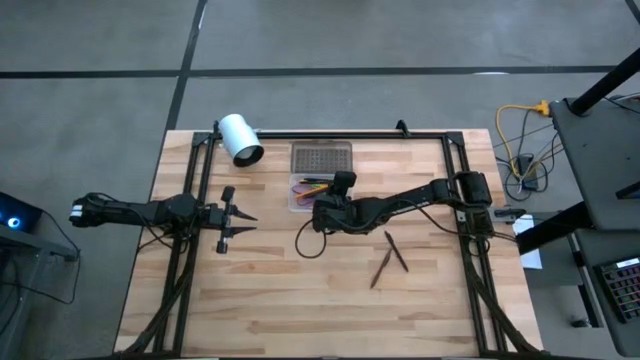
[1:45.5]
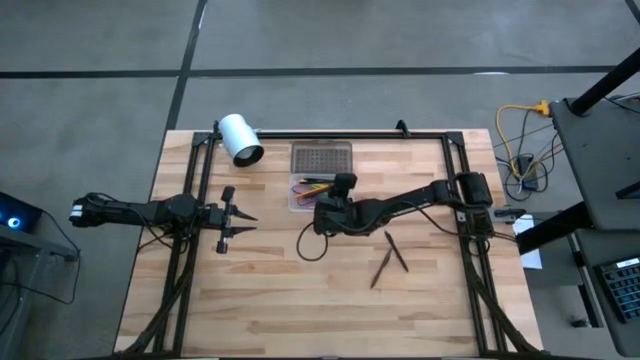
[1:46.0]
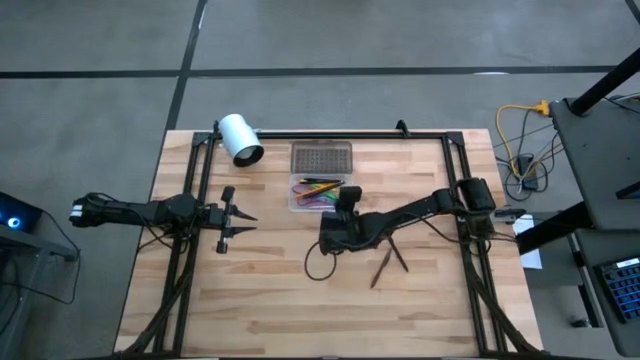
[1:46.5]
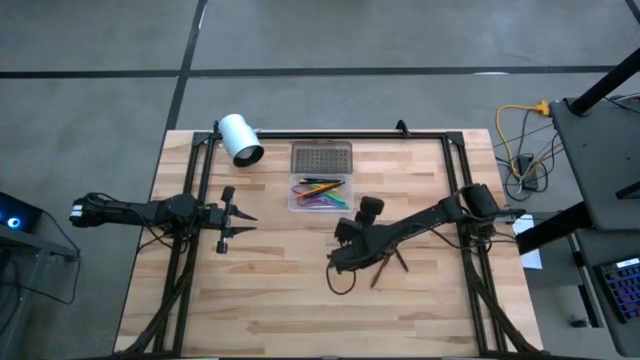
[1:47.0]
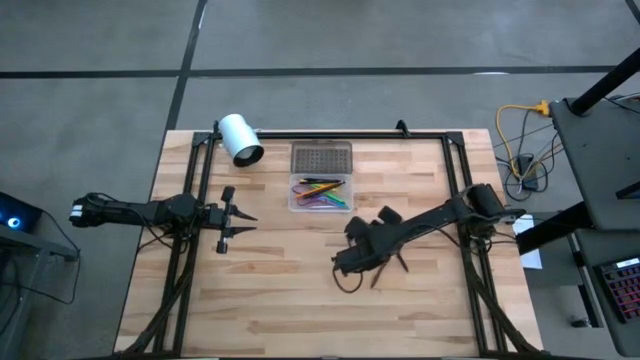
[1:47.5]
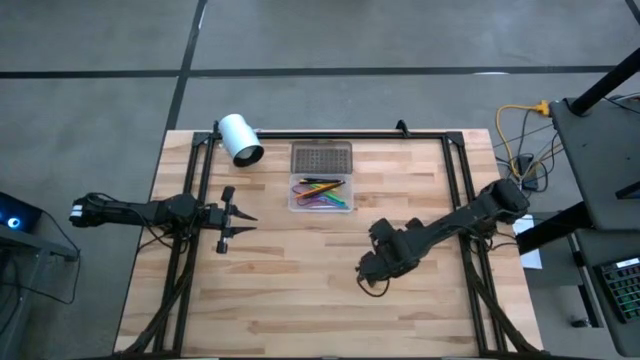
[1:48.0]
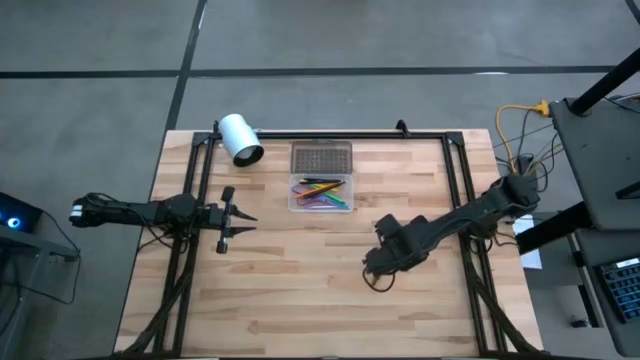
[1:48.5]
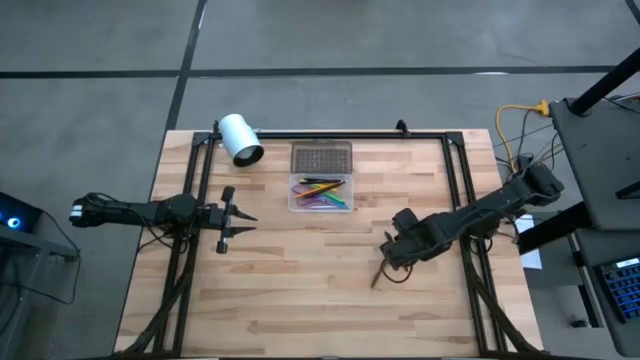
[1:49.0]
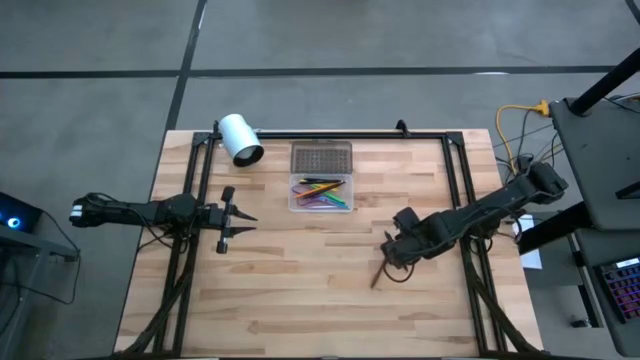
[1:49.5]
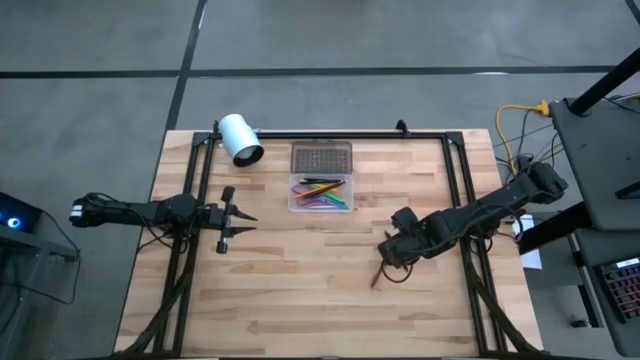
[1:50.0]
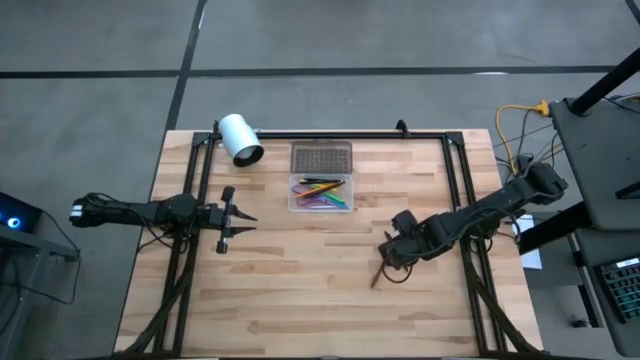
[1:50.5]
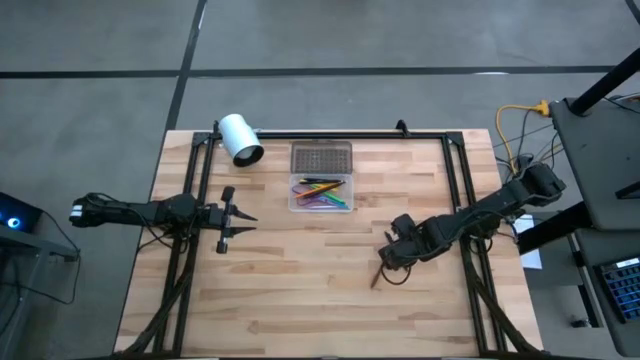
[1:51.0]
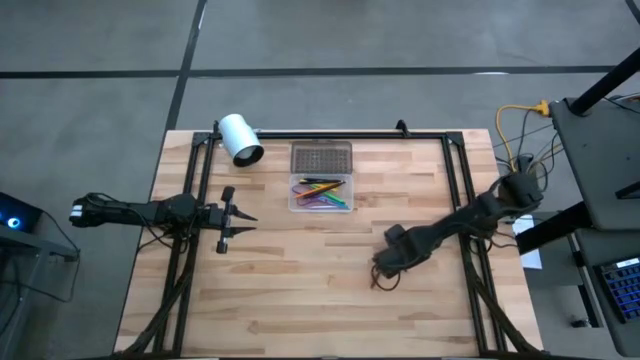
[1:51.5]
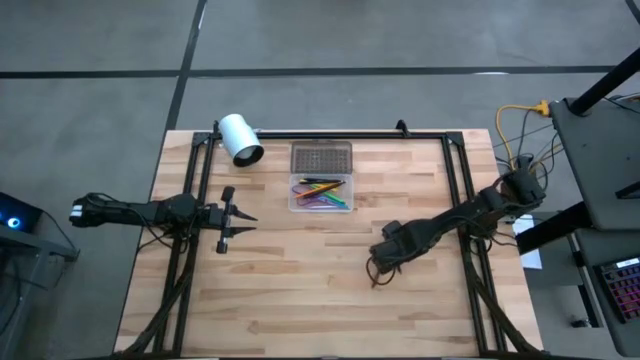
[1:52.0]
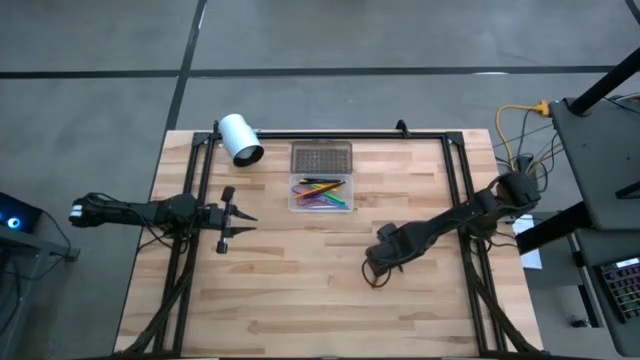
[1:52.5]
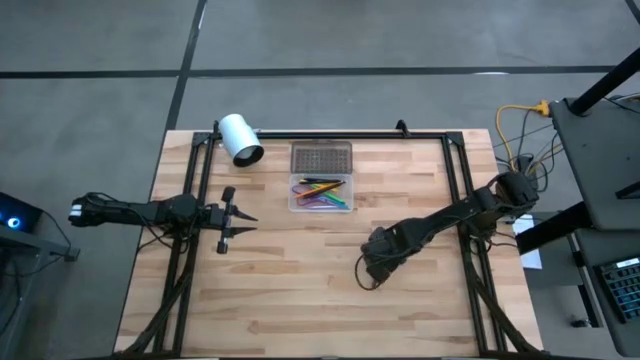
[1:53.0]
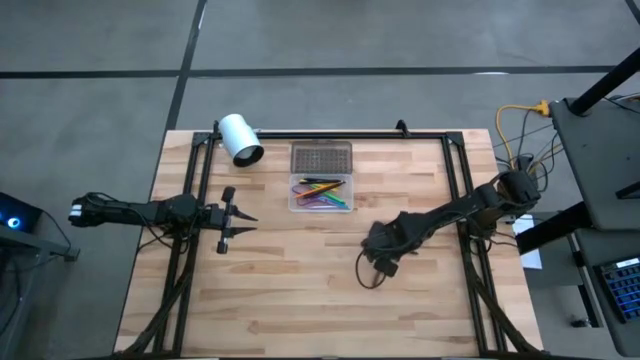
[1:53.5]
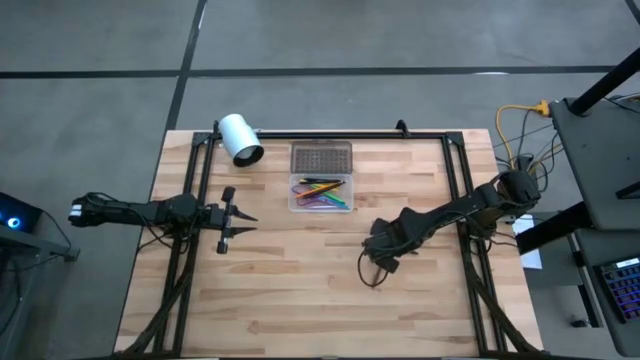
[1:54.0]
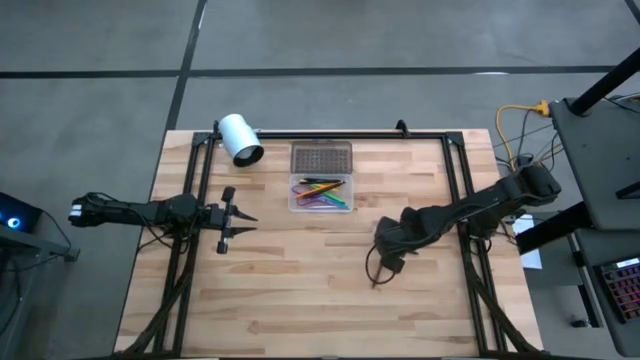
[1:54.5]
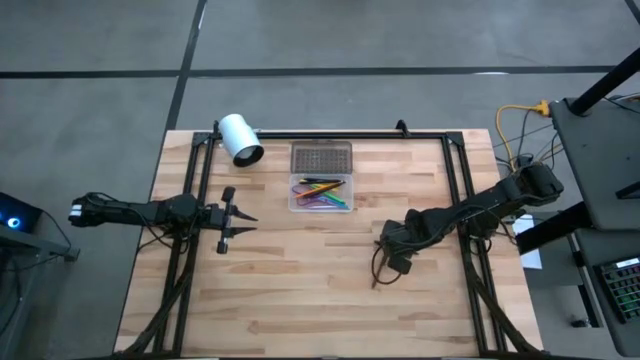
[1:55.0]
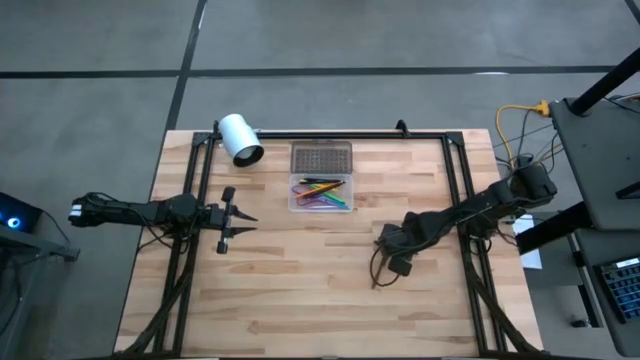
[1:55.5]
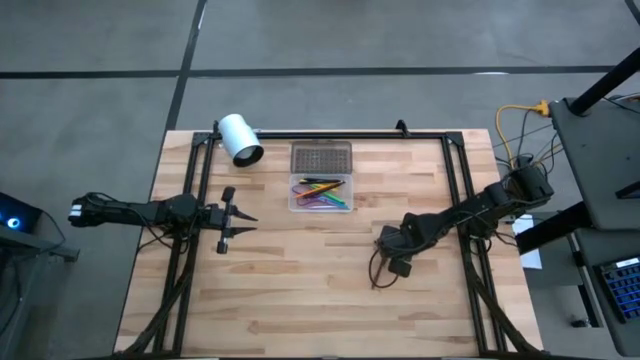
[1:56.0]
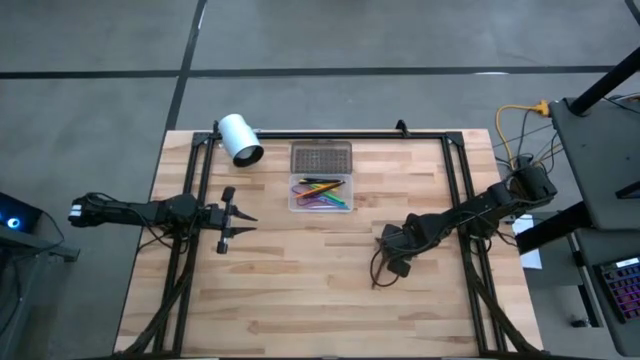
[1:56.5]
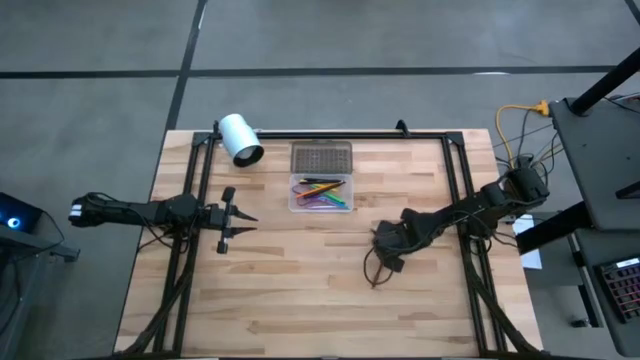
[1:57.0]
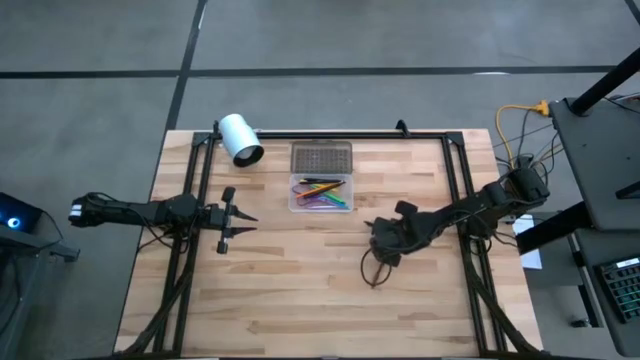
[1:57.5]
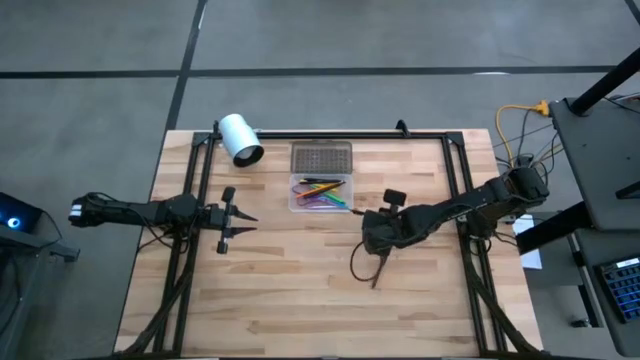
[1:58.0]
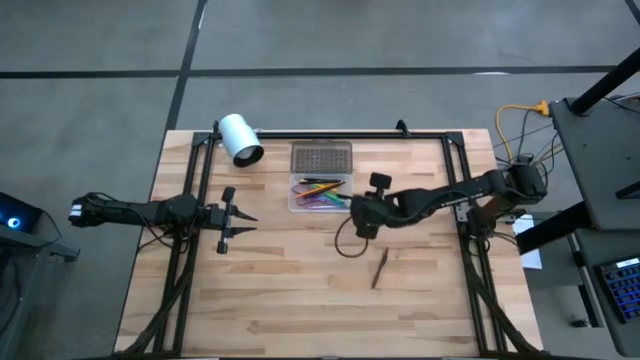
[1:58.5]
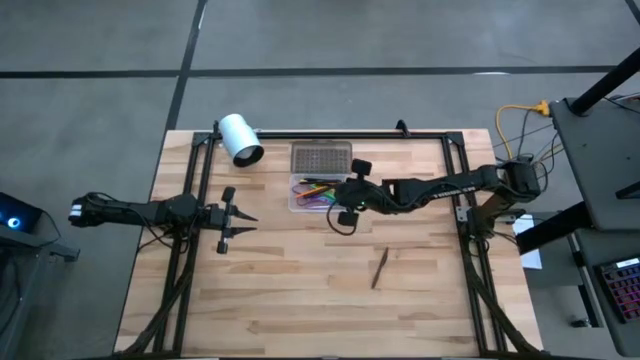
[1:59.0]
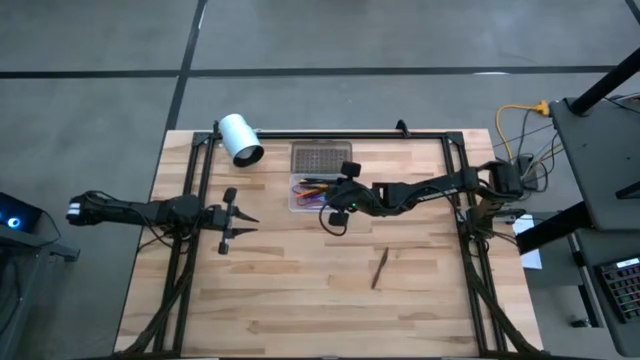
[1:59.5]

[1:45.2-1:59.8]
Task: Pick & place school supplies into a supply box
Put the black pen into the supply box

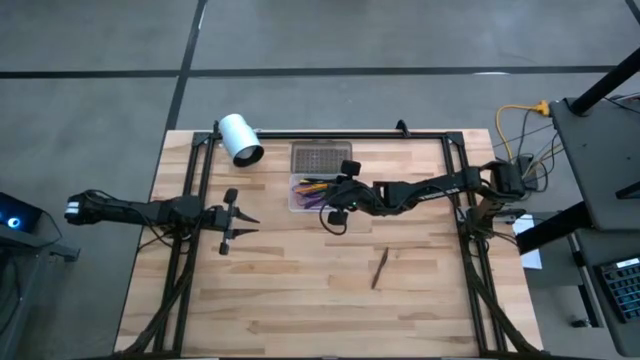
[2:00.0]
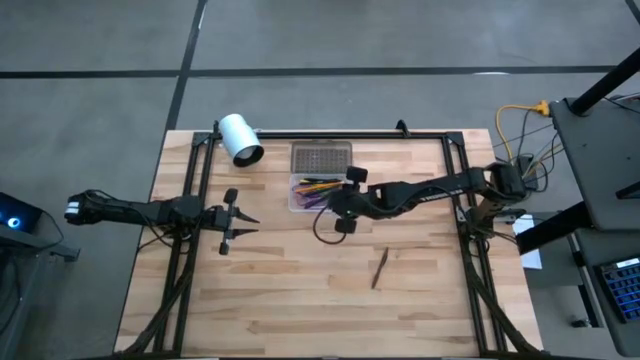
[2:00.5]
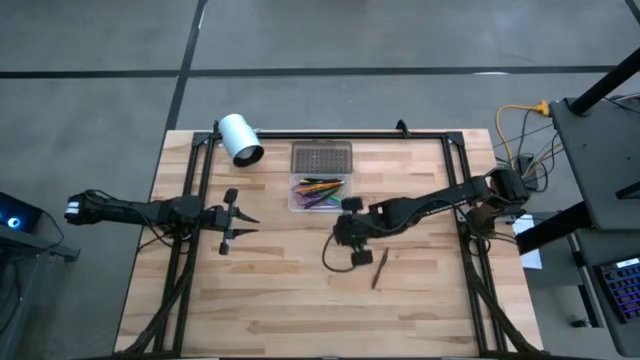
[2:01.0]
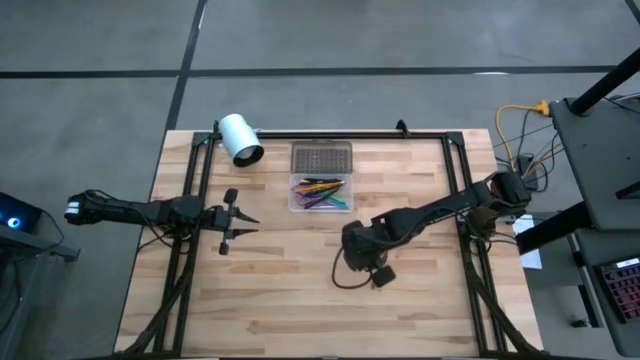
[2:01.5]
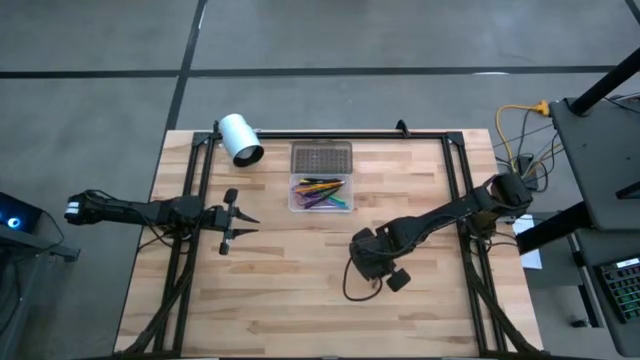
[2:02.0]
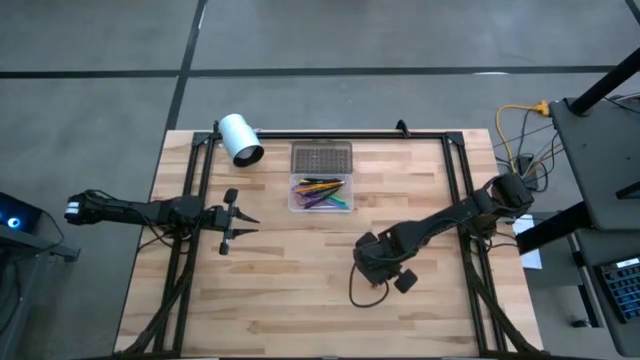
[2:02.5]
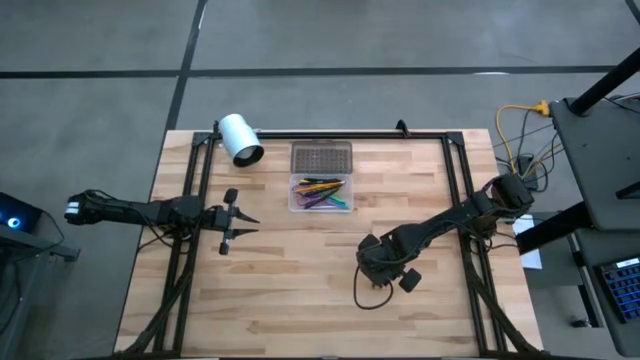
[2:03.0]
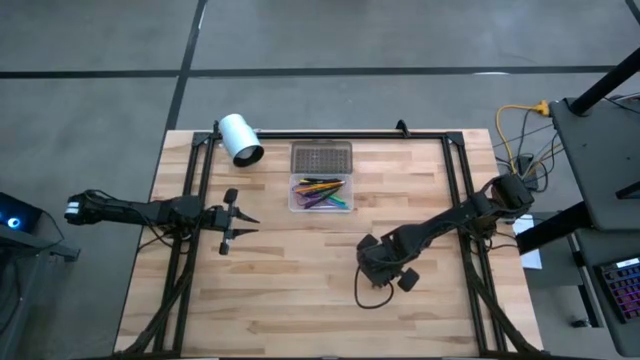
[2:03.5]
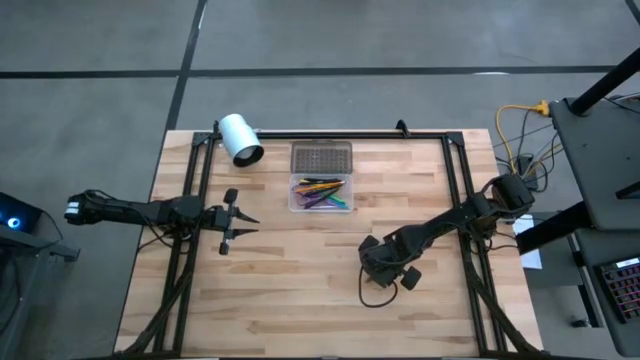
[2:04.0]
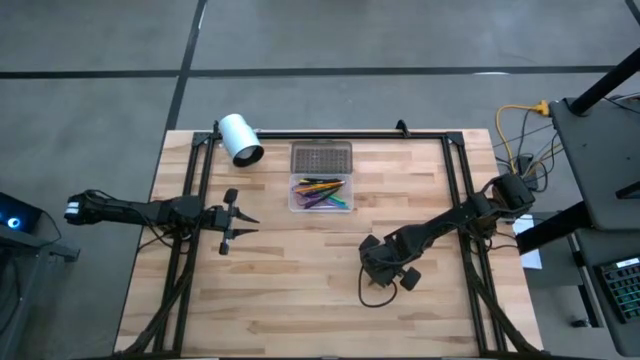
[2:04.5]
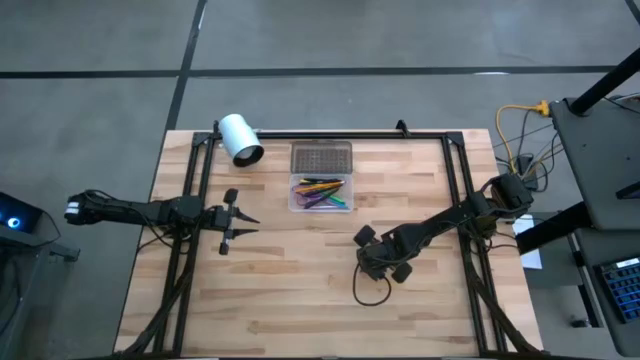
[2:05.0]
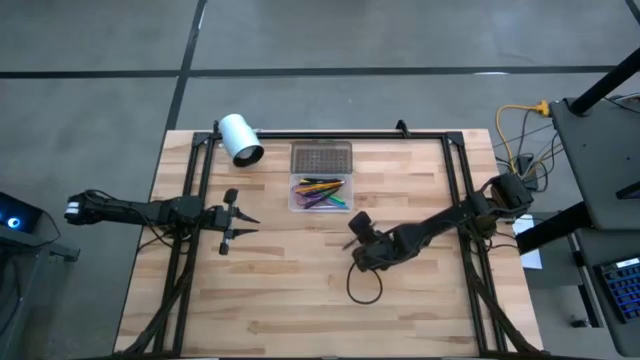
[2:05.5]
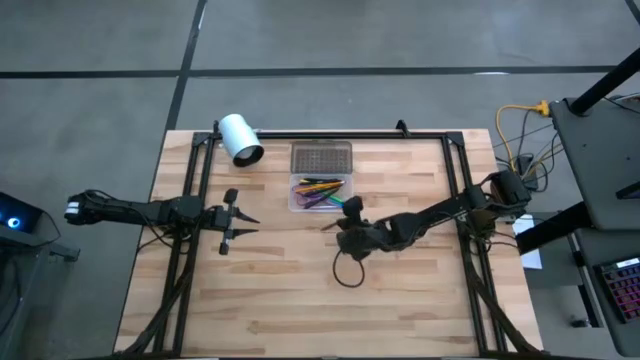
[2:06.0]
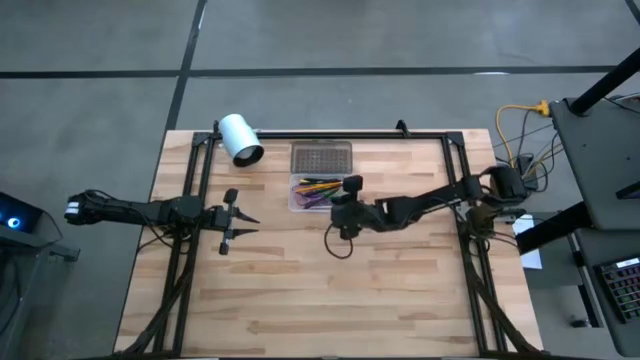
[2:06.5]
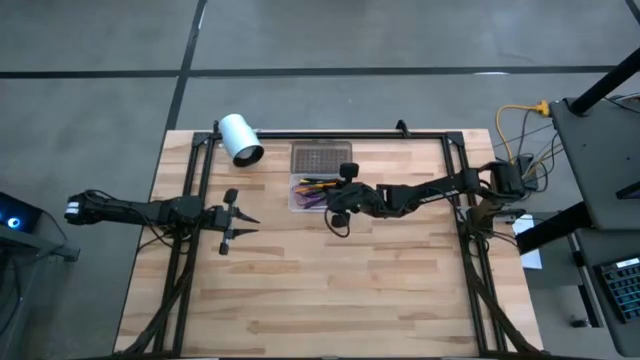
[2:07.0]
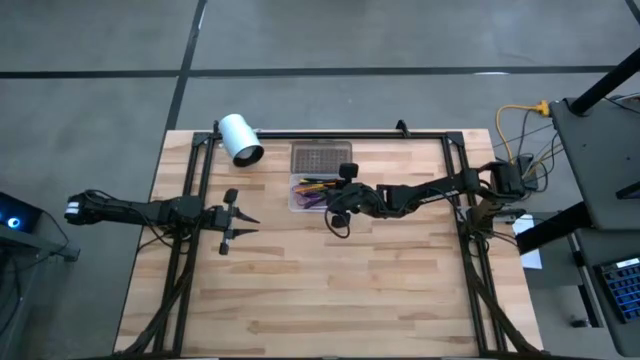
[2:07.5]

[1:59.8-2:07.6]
Put the brown pen into the supply box
